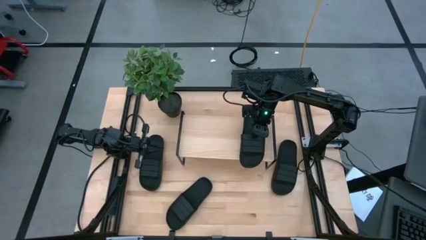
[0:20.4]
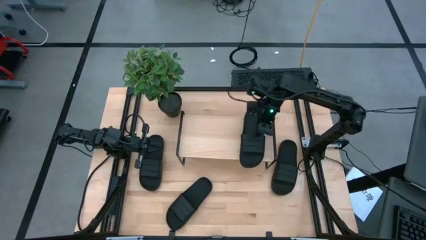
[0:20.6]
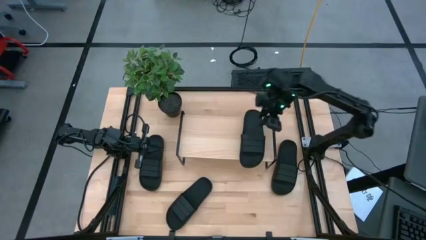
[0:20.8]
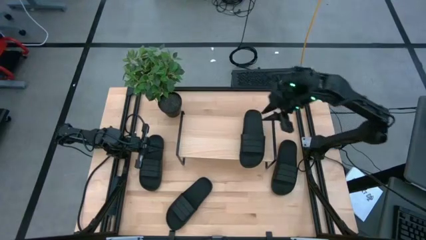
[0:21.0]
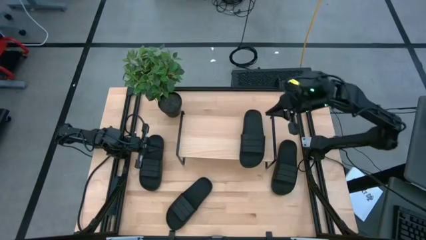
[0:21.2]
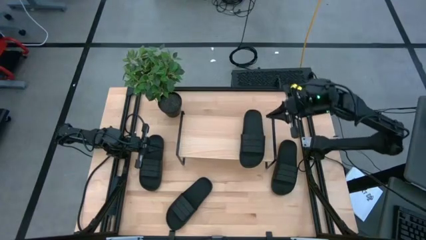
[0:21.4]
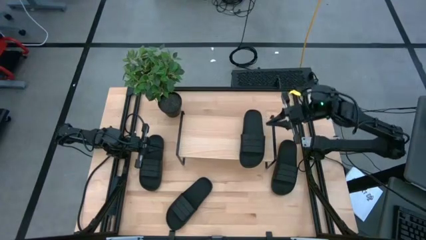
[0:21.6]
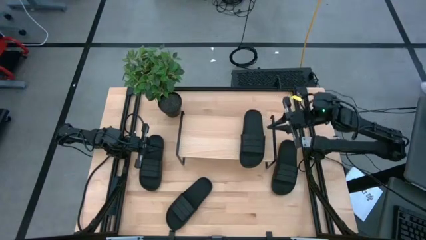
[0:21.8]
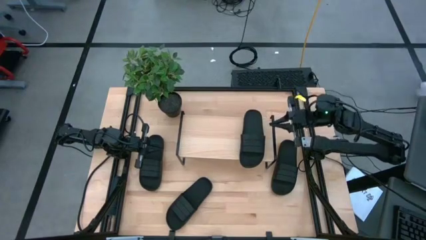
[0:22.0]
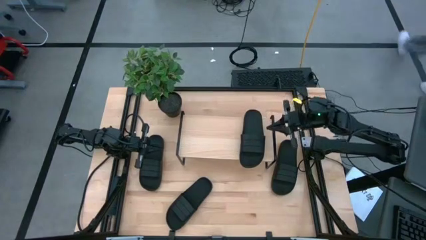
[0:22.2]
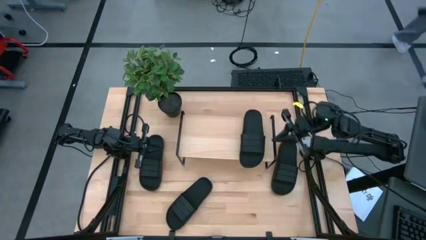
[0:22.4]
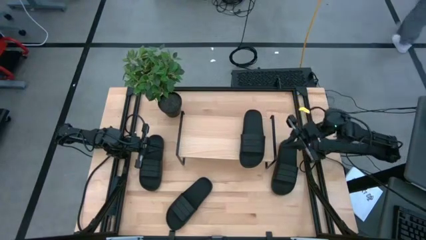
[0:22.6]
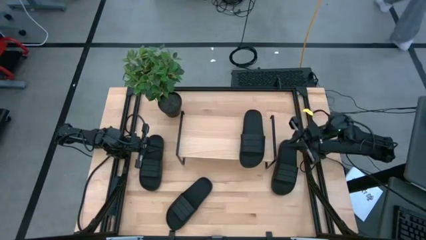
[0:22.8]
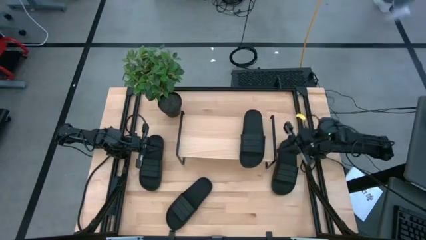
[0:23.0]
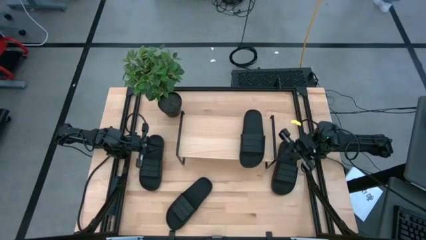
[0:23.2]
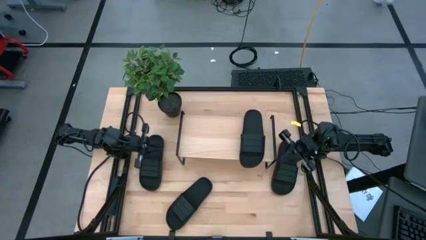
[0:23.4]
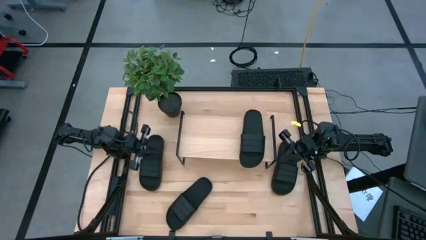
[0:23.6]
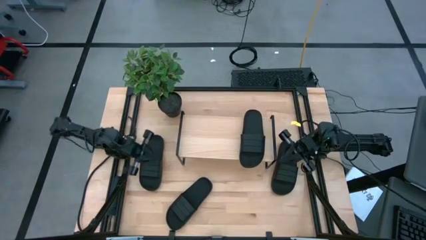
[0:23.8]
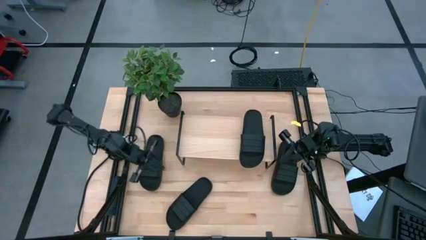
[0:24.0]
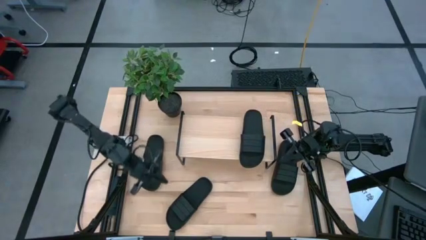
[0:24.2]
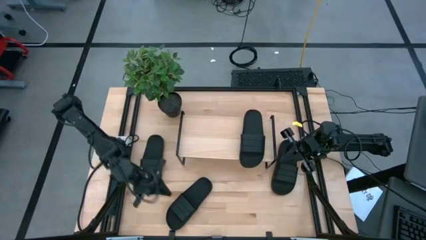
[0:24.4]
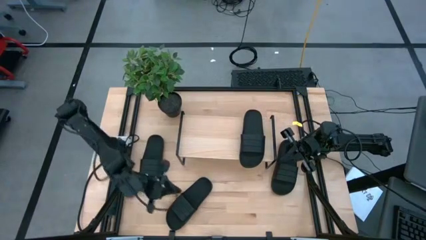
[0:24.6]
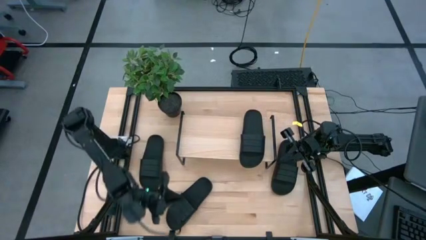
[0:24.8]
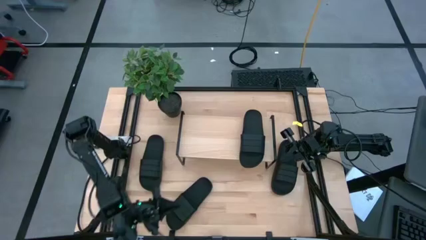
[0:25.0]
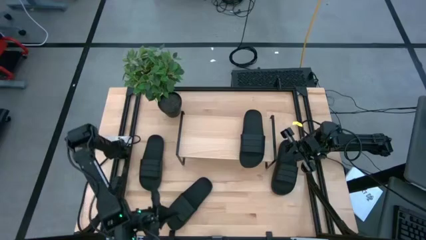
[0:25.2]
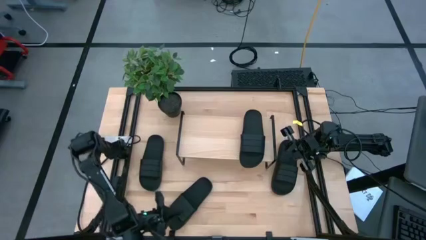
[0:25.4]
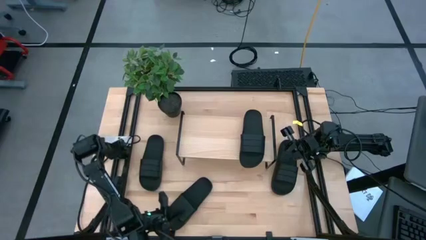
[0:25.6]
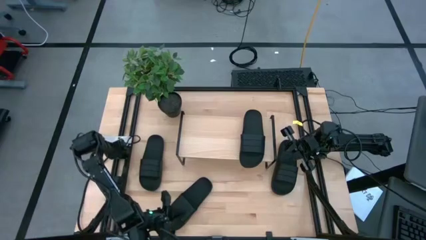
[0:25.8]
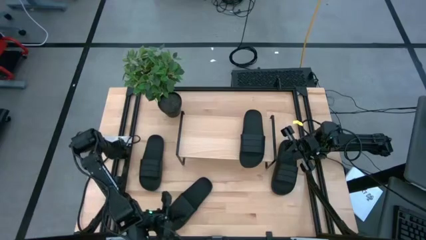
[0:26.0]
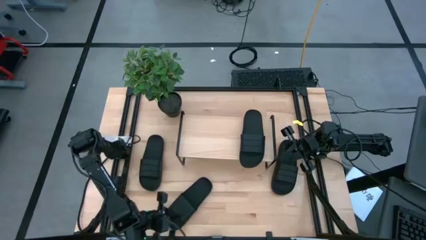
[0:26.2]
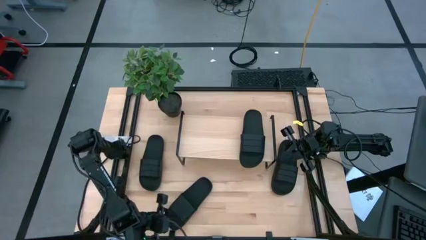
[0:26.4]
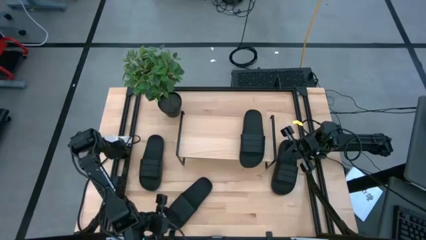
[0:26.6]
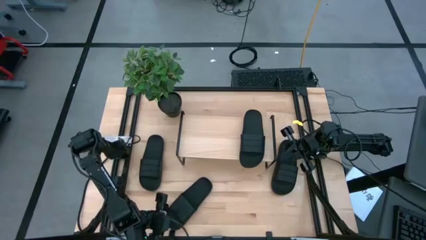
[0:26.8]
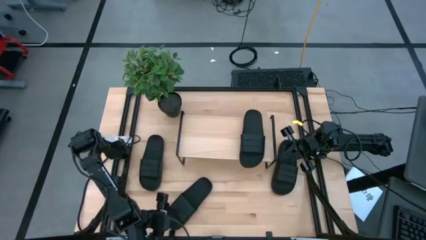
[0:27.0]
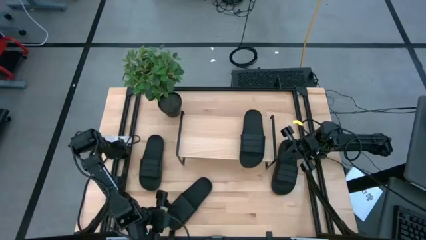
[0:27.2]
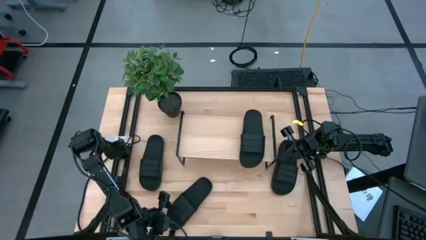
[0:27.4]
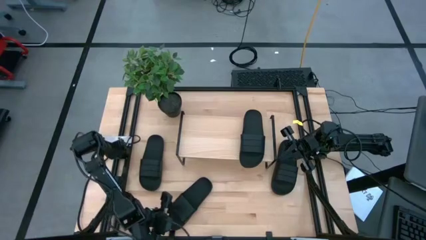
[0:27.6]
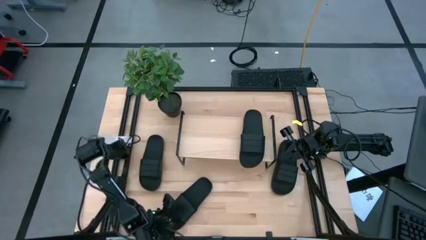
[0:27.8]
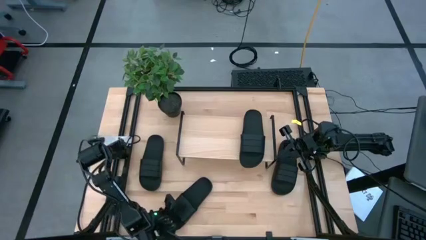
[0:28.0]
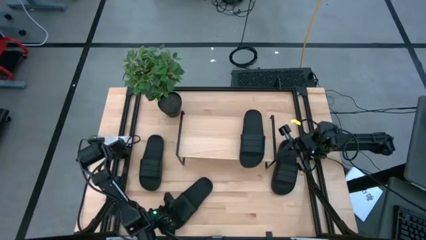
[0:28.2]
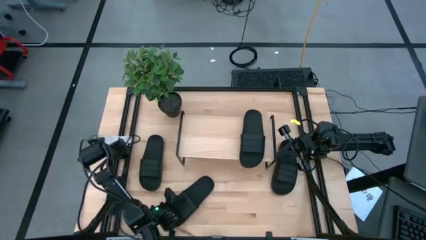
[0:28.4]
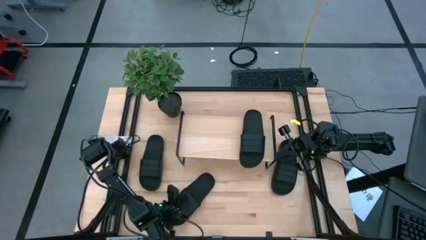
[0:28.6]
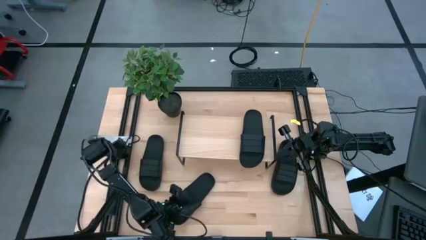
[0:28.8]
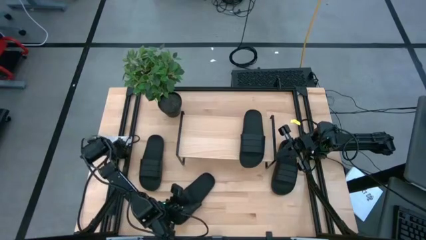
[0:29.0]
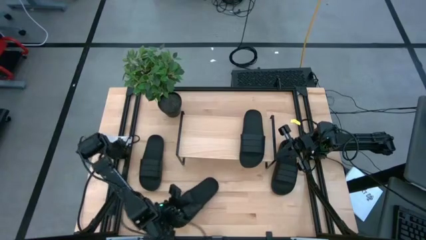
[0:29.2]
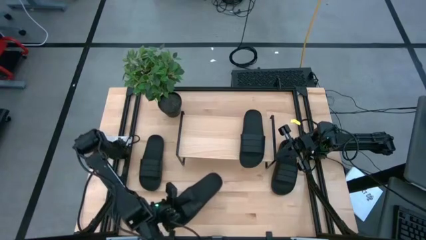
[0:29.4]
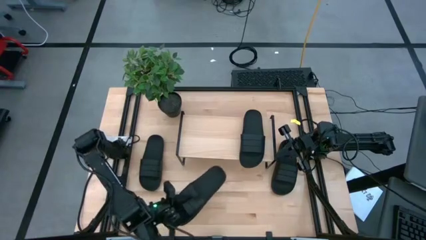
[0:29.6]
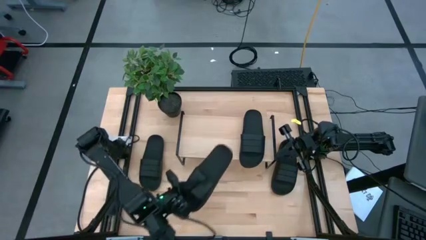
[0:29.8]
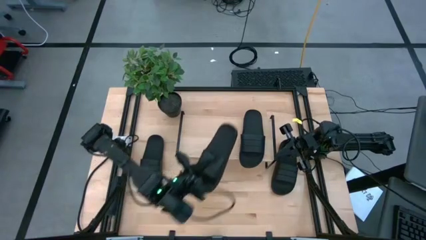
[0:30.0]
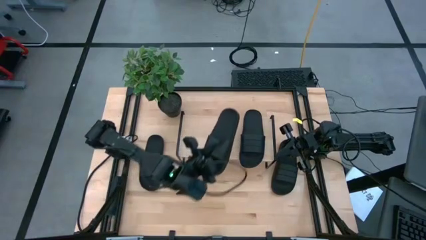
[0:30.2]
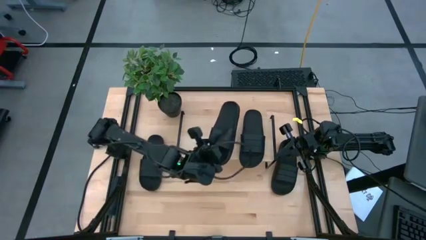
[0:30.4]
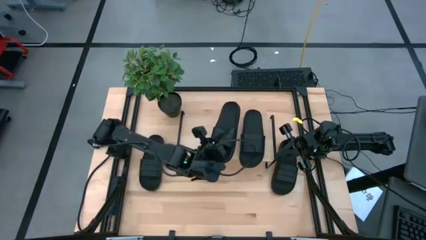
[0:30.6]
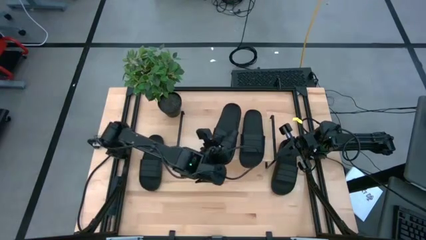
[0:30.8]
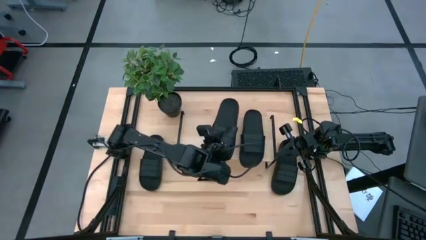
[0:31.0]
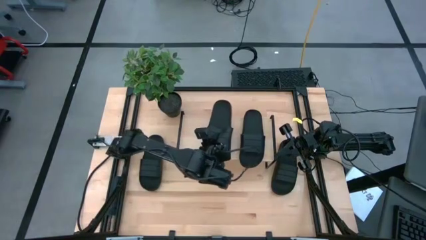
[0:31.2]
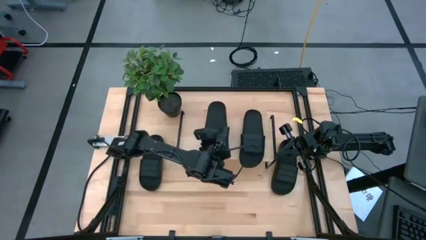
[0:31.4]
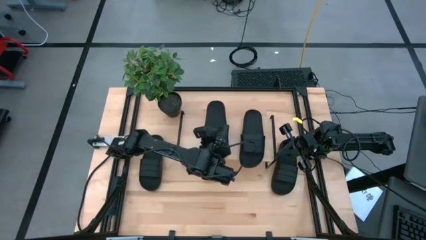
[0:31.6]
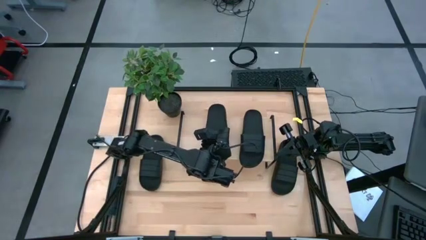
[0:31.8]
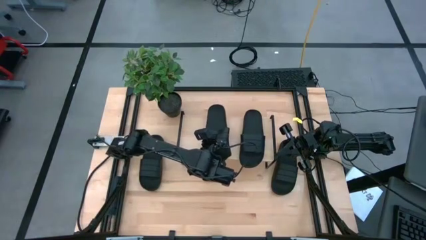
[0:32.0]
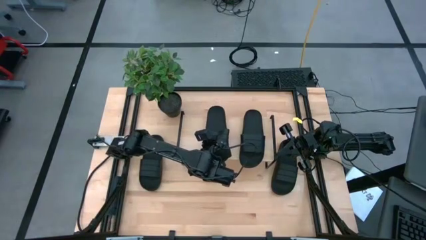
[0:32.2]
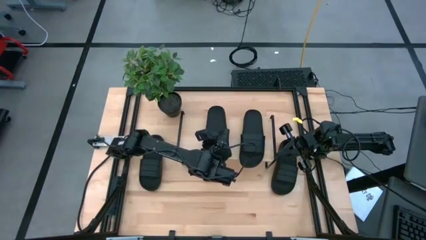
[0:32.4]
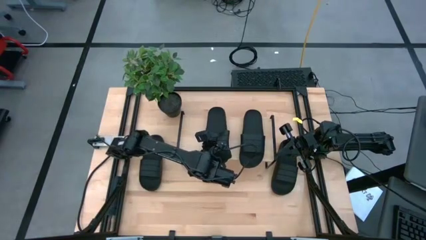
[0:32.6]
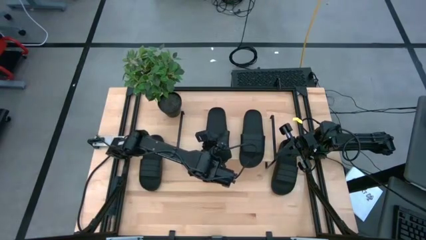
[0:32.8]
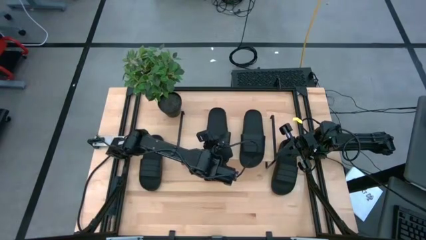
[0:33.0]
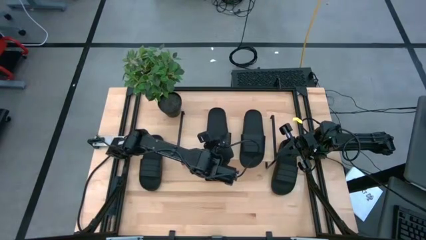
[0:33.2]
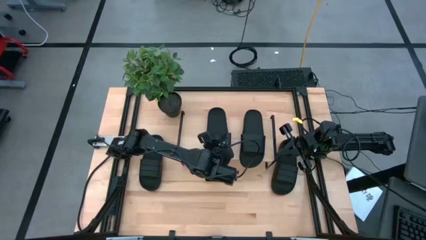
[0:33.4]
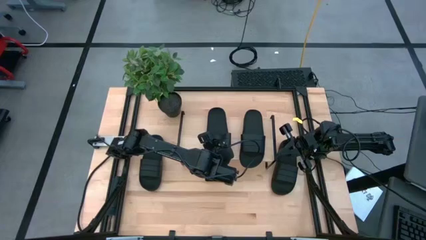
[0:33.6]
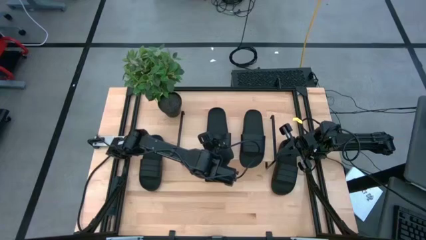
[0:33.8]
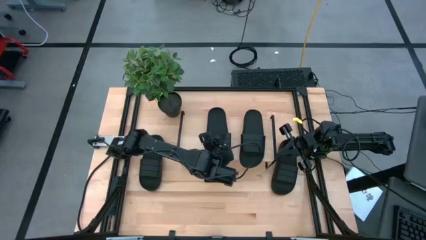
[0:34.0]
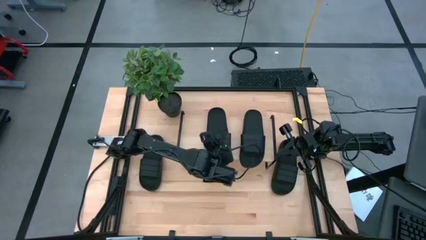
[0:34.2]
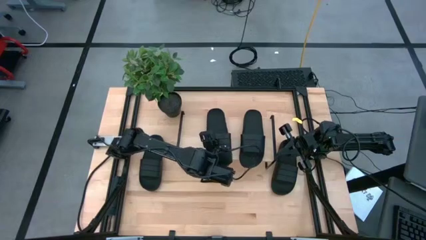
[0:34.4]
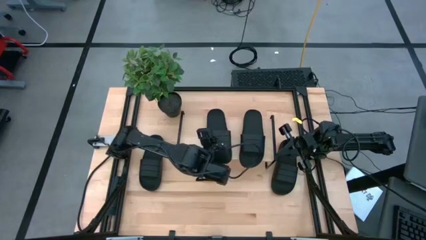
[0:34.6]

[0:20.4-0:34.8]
Task: Pick and place slides into the shelf
Put the black slide on the shelf
